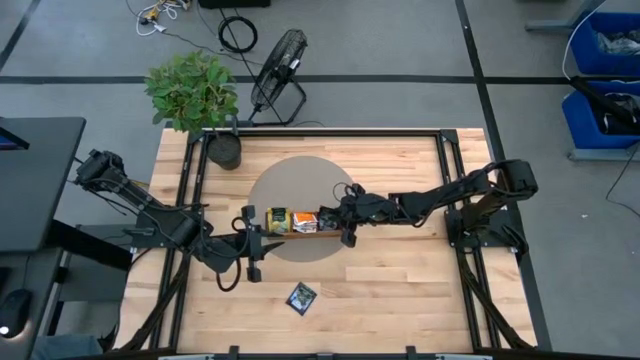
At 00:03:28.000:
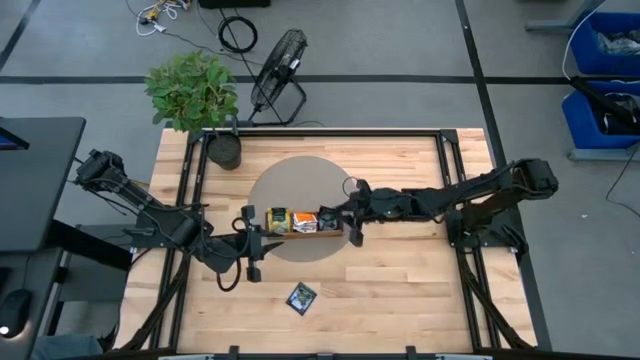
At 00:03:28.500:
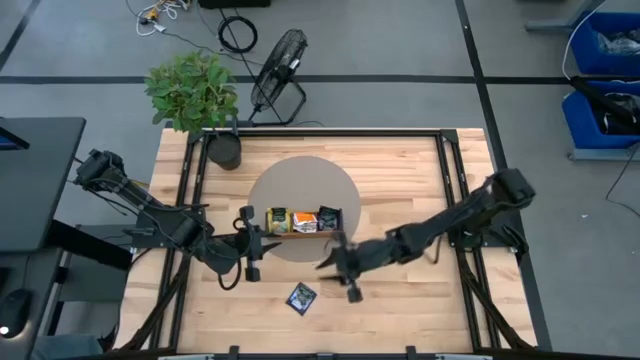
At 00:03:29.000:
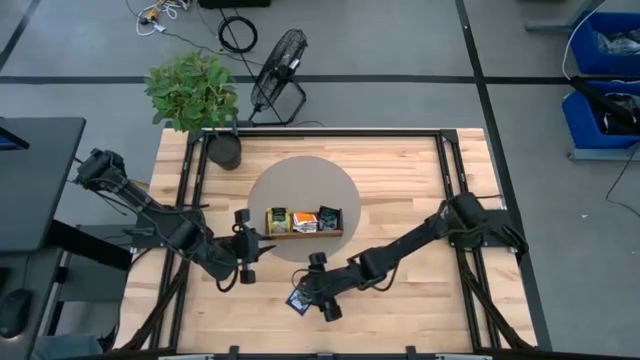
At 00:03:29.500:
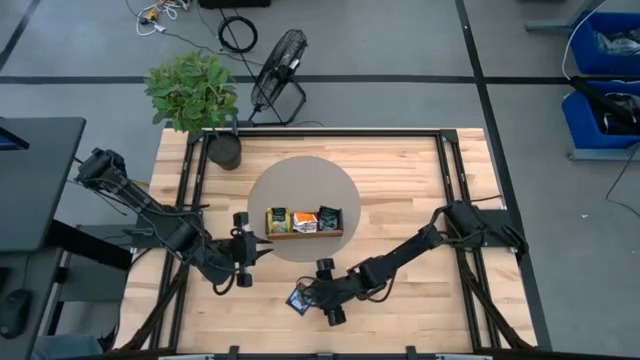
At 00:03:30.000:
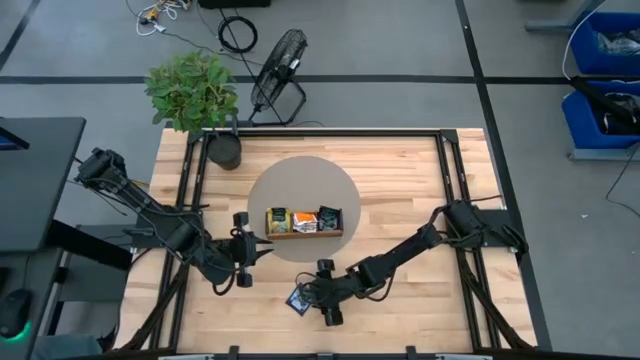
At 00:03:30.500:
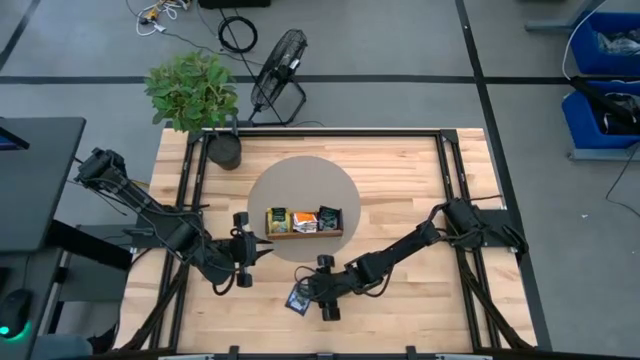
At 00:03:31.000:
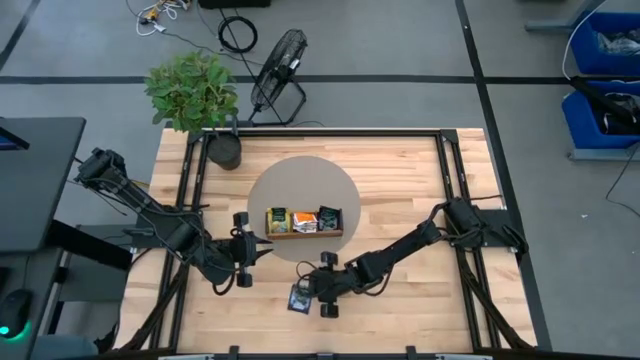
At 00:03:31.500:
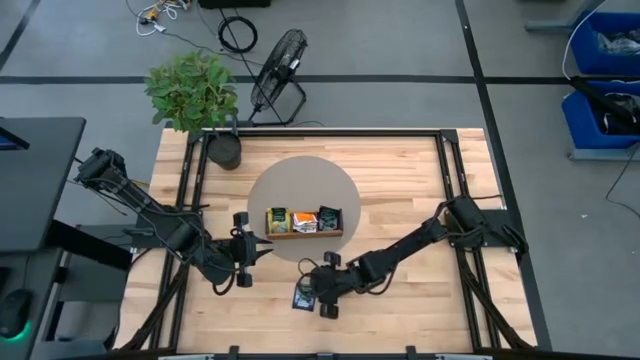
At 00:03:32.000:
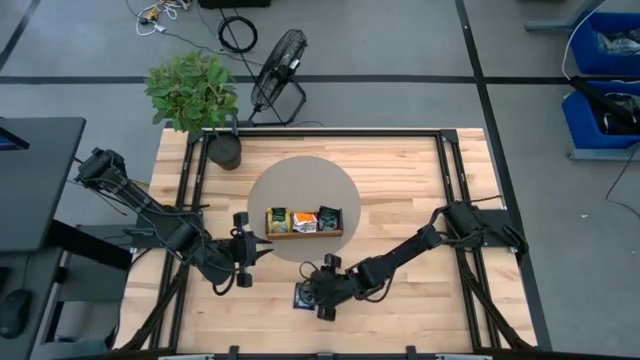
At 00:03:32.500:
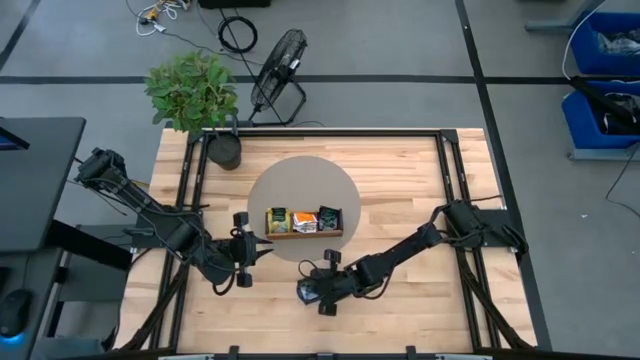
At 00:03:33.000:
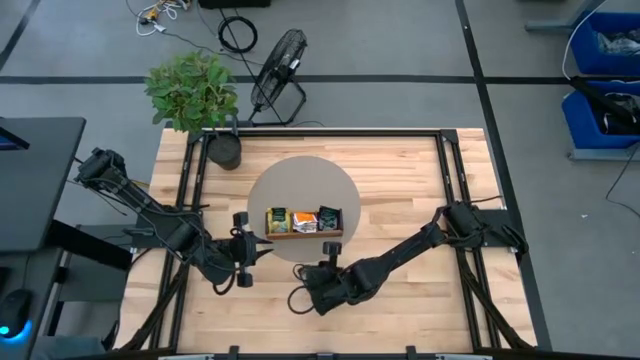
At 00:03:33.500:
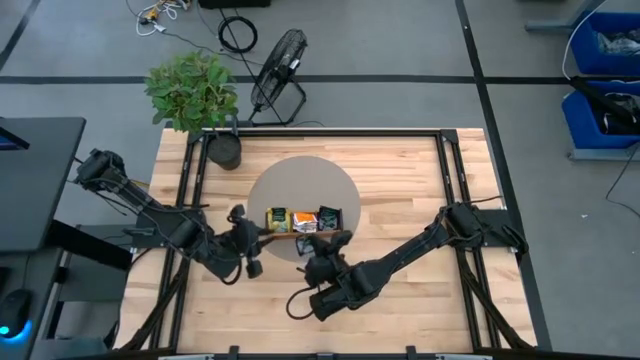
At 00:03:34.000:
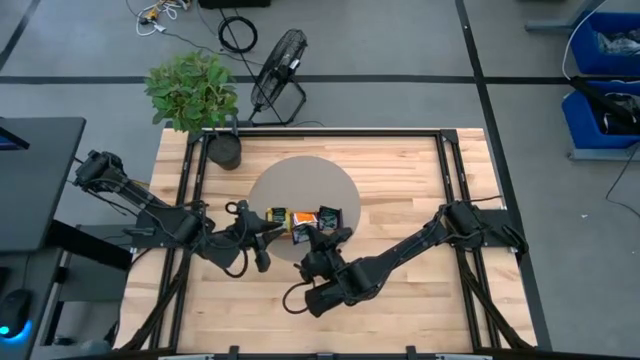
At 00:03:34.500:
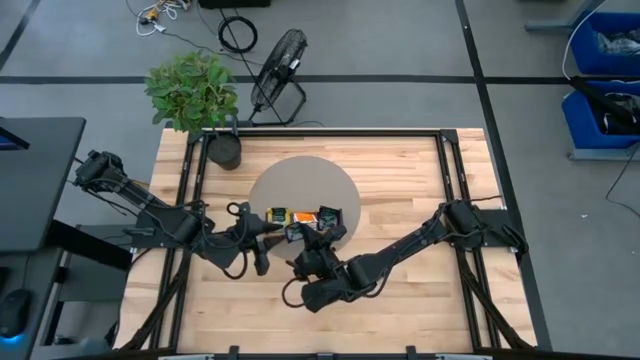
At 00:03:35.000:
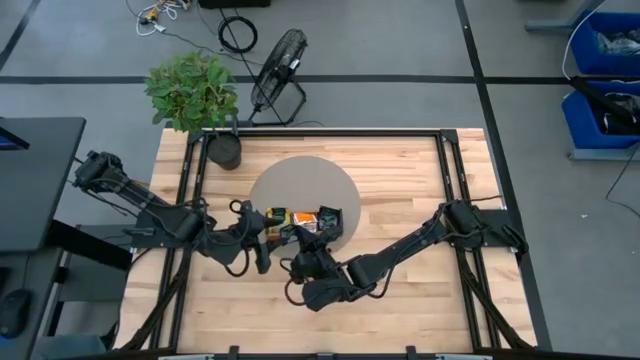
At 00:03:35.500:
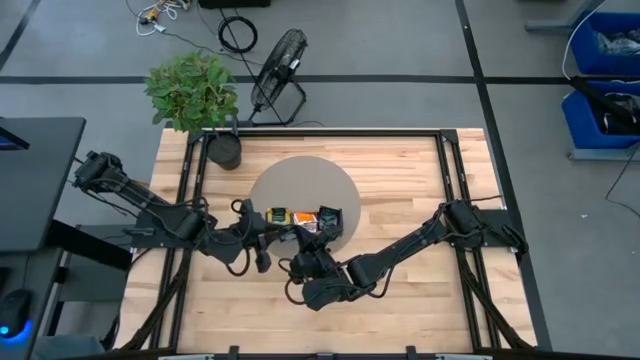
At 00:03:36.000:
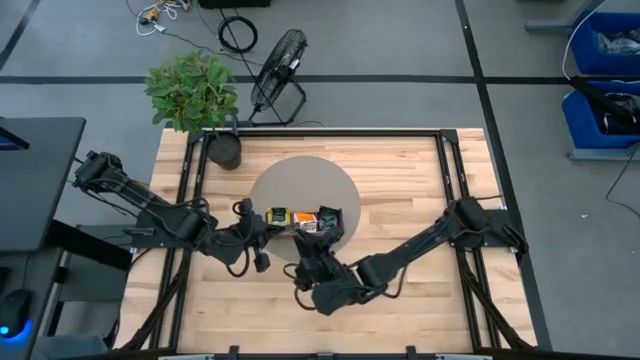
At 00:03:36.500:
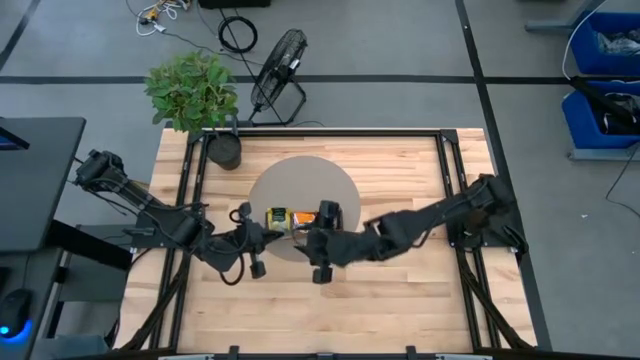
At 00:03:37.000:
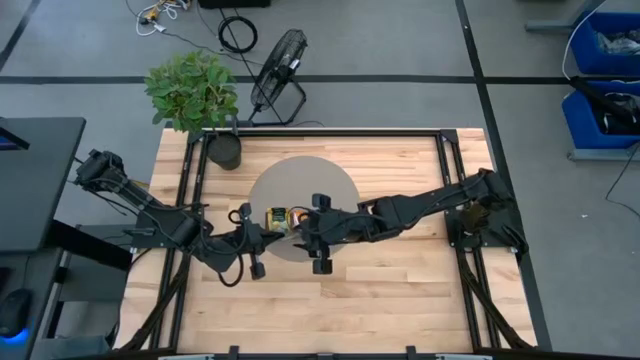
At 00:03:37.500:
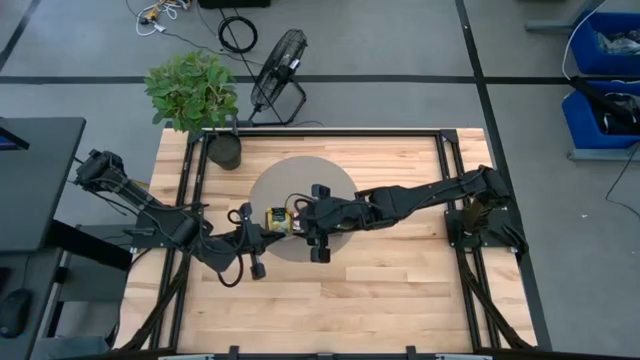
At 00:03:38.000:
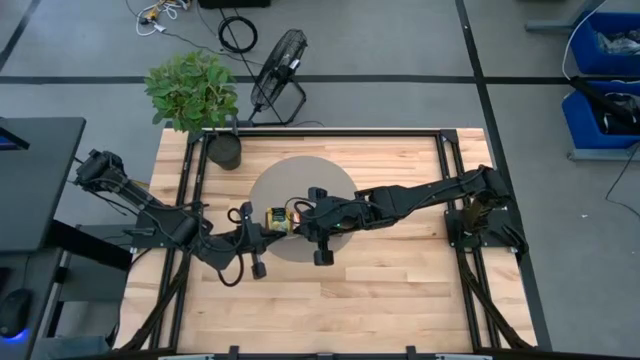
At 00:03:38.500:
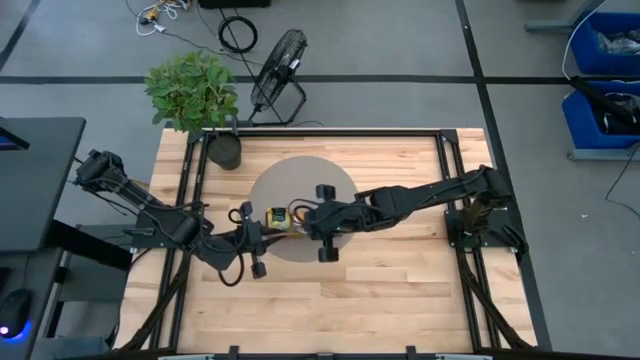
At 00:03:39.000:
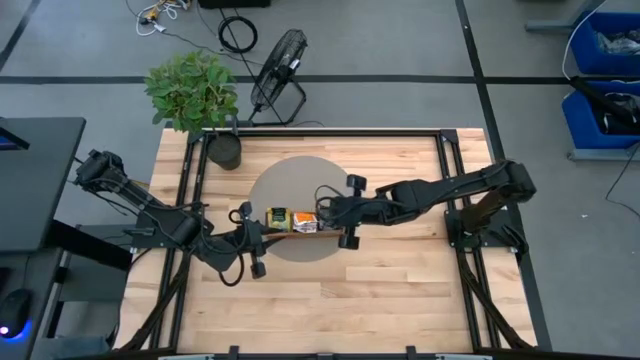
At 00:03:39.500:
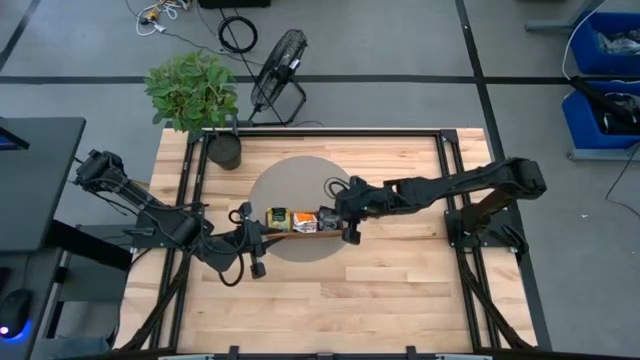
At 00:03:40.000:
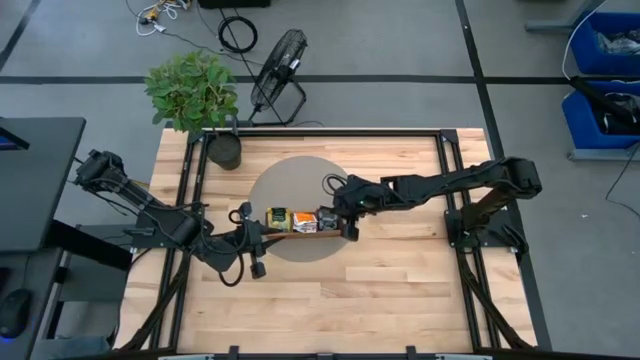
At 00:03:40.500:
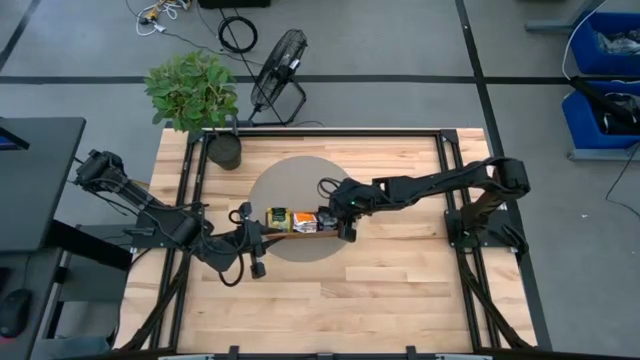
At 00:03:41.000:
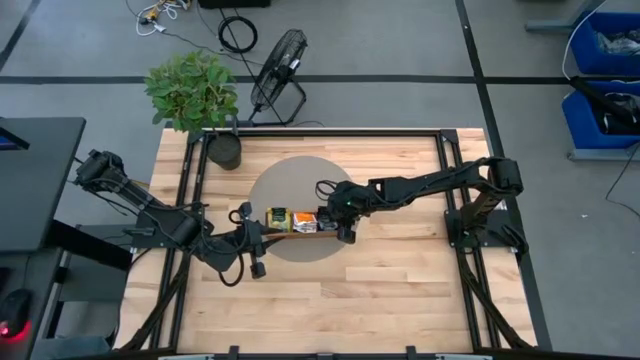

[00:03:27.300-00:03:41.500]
Task: Pick & Place Tea
Put the violet tea bag into the wooden organizer

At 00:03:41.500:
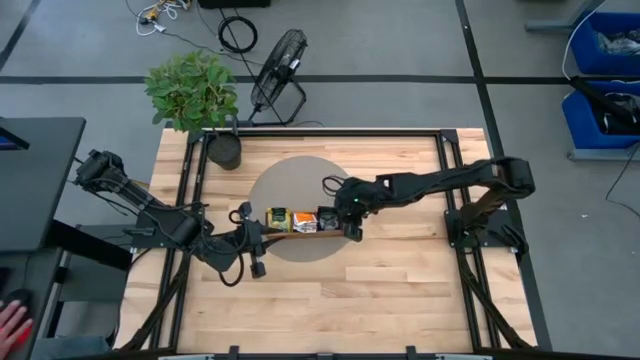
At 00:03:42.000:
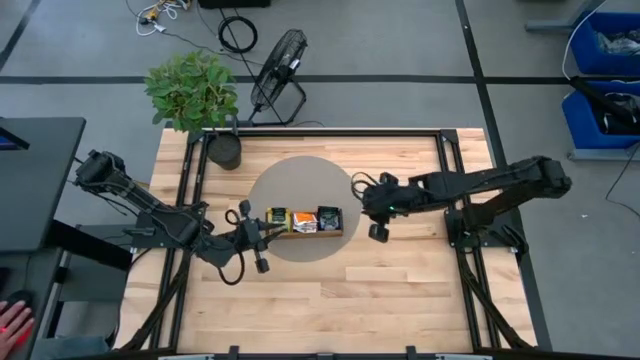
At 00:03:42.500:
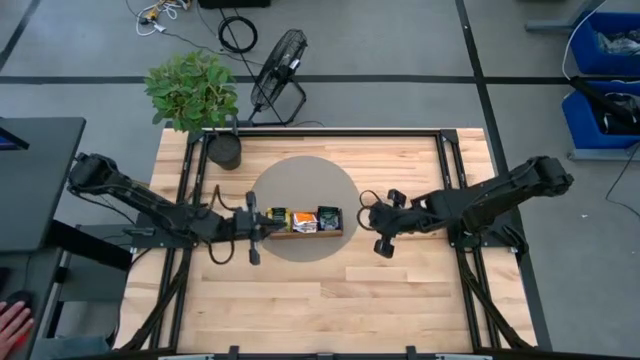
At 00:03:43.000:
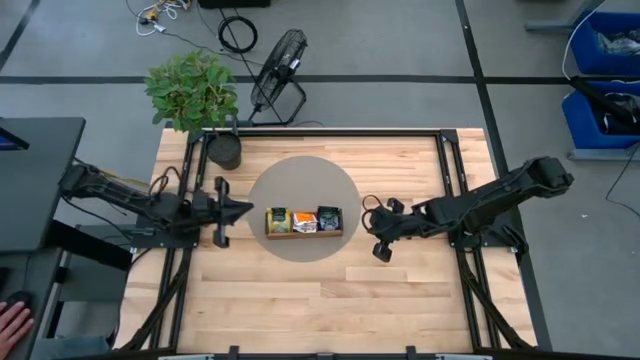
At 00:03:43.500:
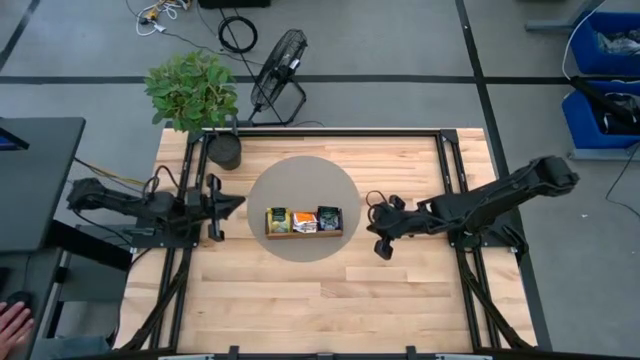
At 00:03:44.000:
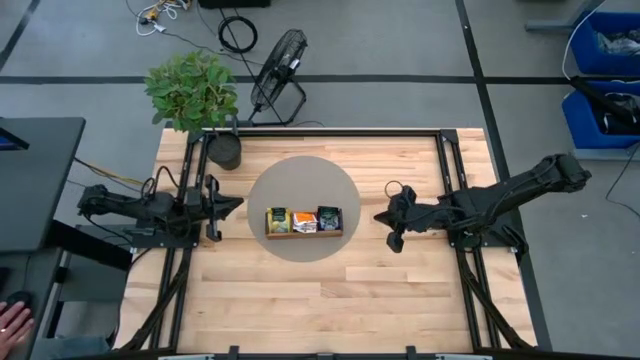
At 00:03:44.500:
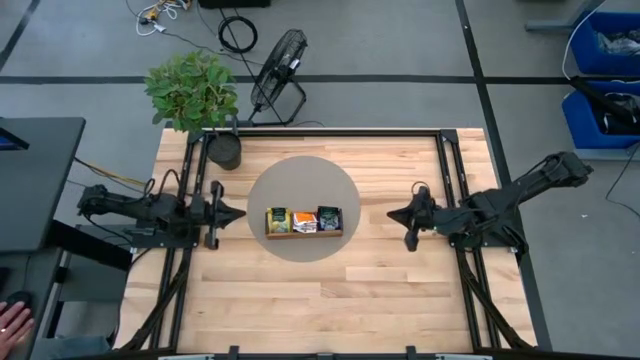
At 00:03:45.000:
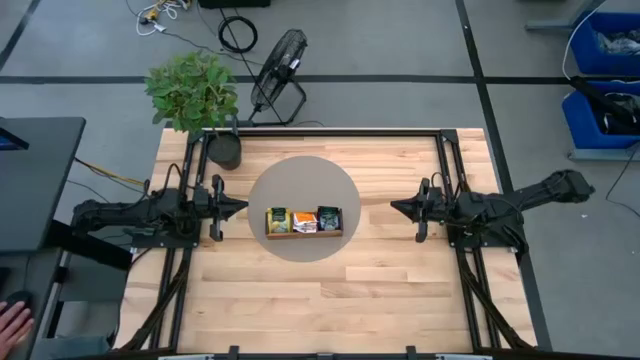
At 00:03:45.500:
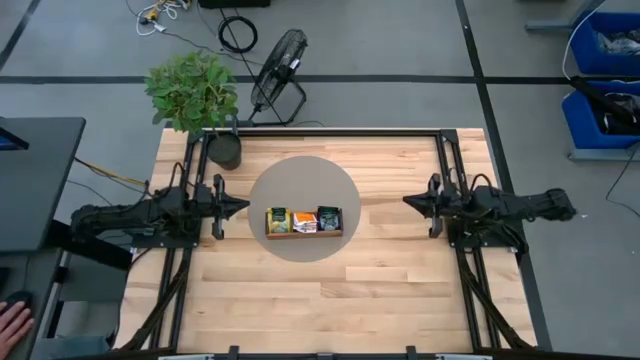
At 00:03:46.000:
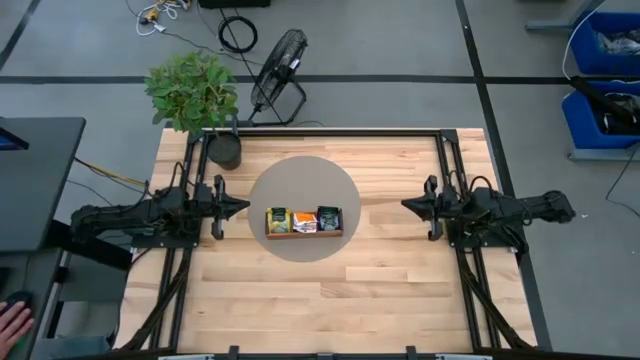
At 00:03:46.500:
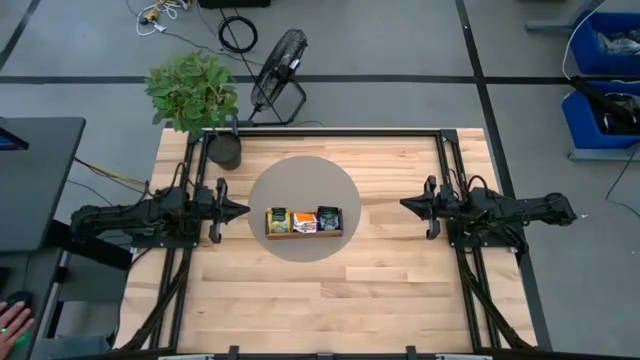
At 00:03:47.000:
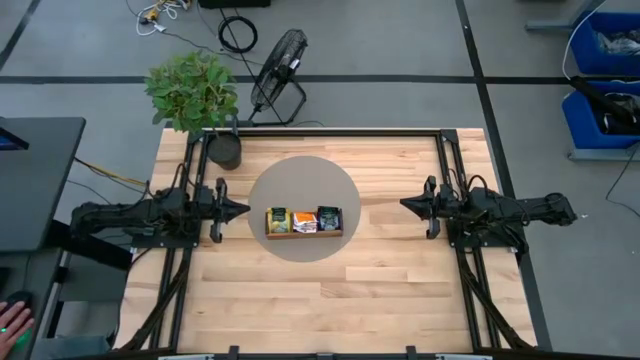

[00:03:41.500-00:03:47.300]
Return to Home Position
